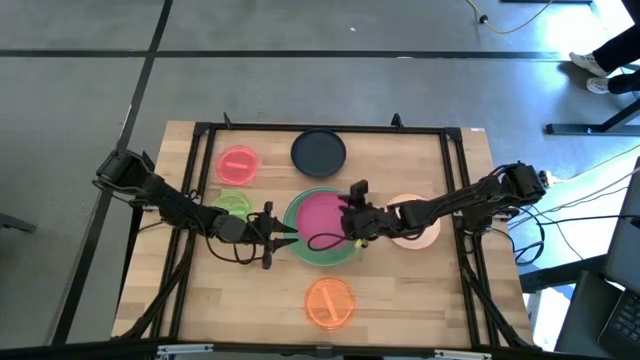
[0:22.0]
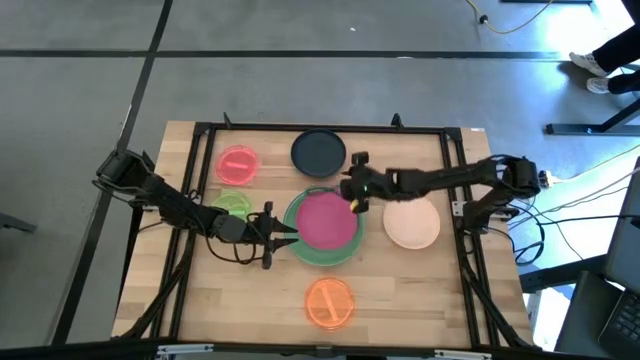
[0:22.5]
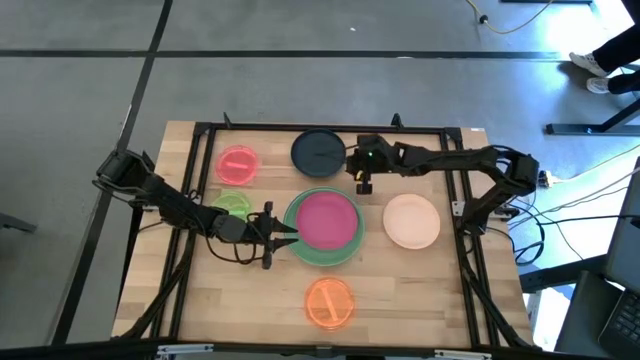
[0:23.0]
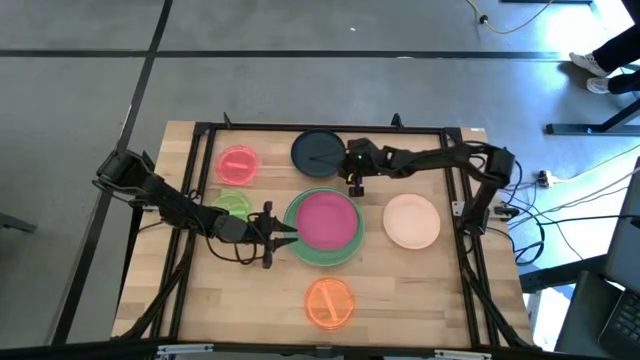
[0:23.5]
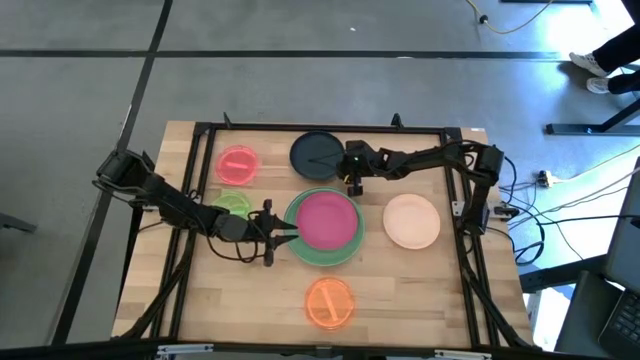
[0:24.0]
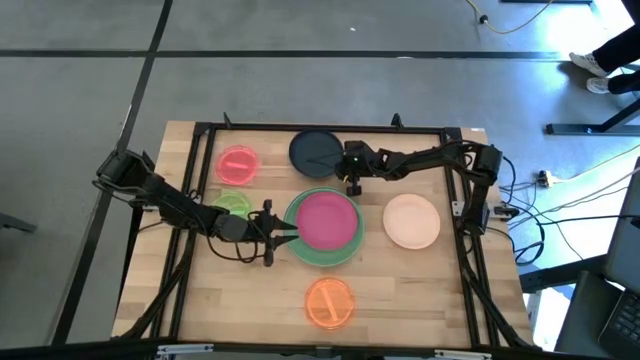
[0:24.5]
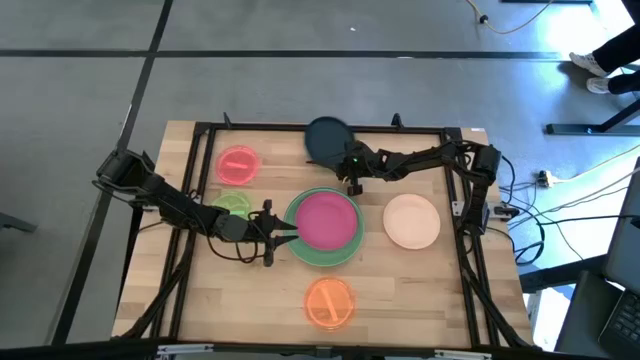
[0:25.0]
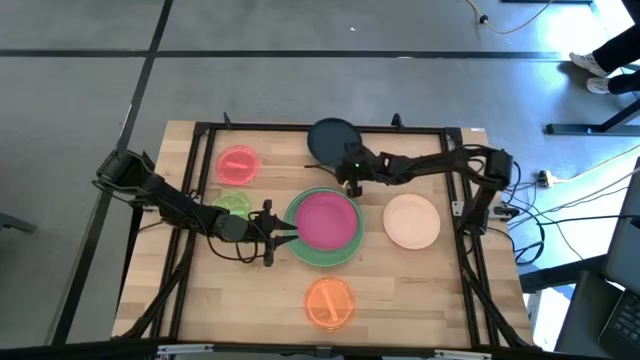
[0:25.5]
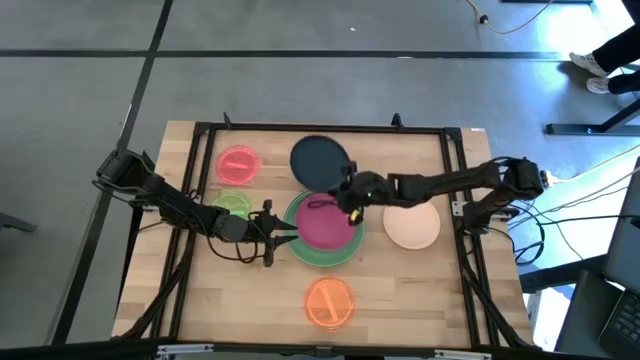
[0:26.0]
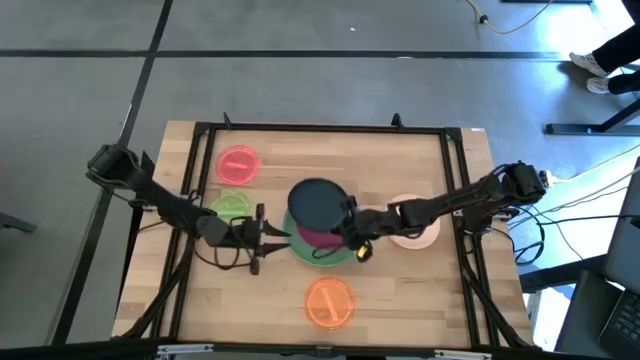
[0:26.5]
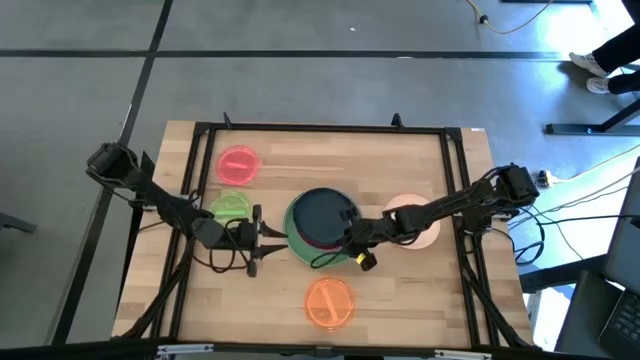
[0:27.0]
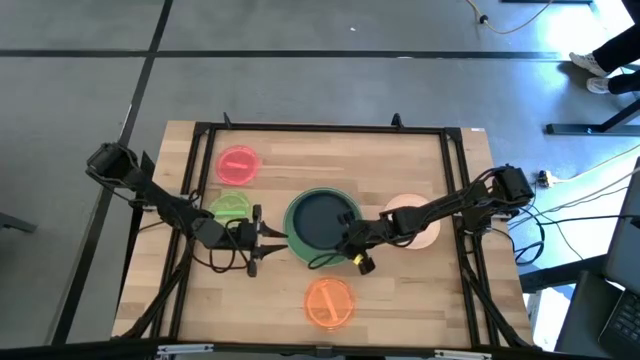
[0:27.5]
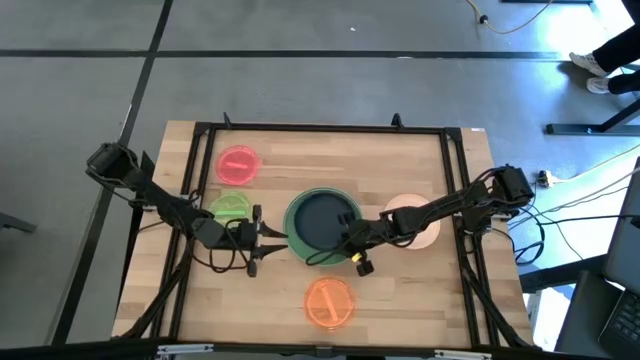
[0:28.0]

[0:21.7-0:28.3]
Task: Stack plastic plates
Stack the dark blue plate on top of the pink plate

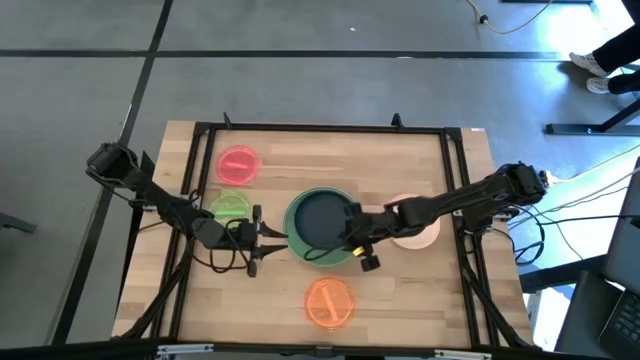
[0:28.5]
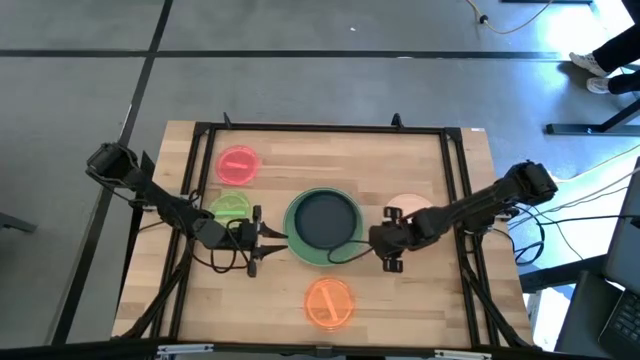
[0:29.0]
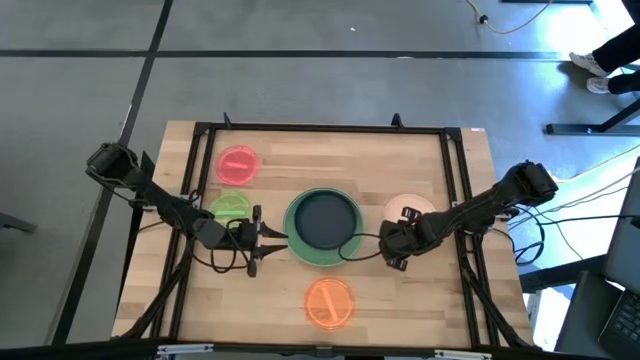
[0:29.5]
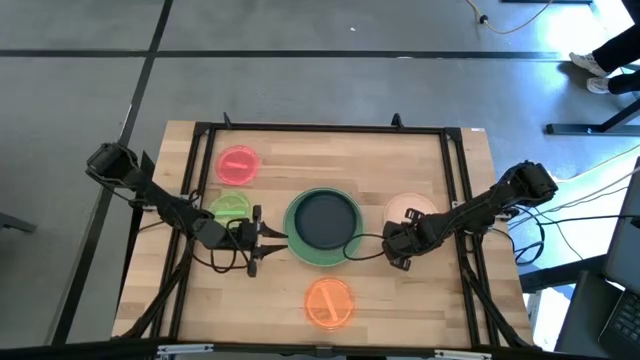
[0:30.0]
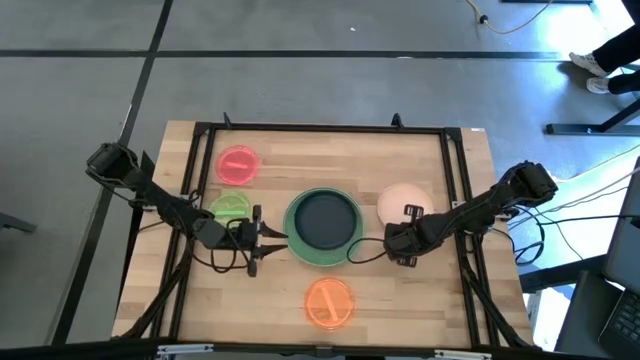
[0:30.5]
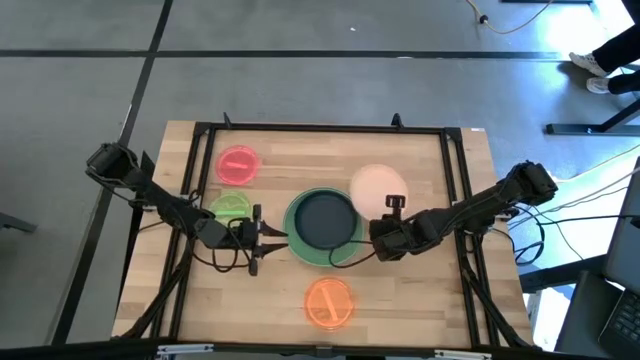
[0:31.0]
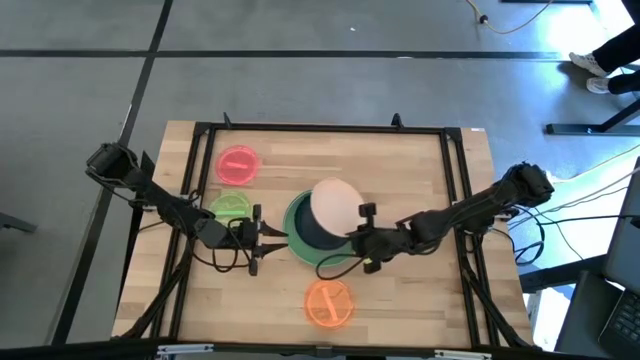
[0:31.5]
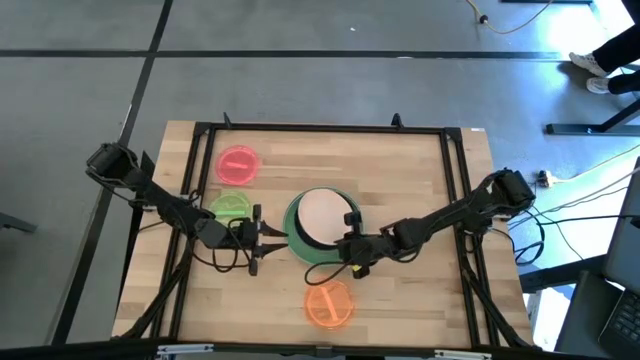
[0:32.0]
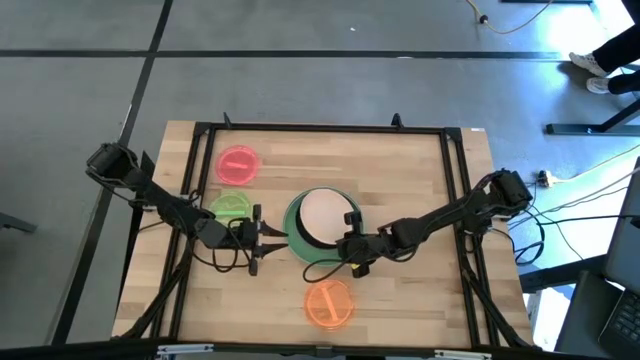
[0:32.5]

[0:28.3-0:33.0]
Stack the white plate on top of the dark blue plate

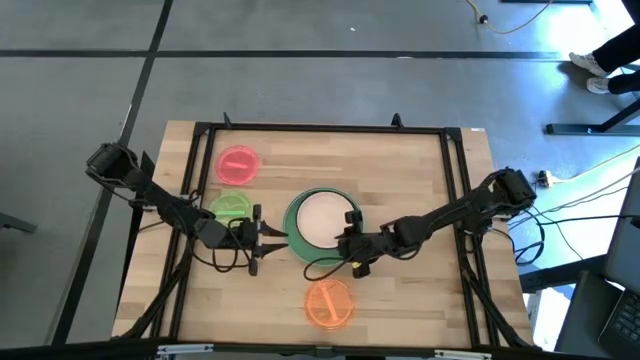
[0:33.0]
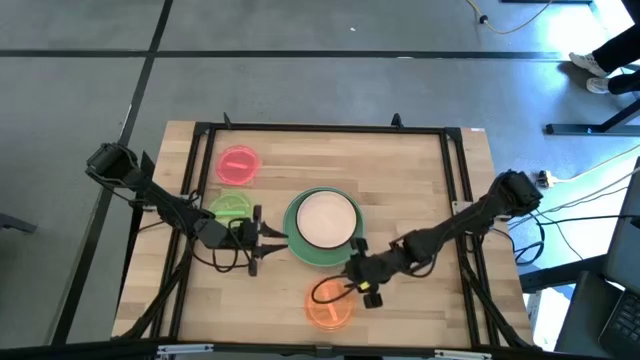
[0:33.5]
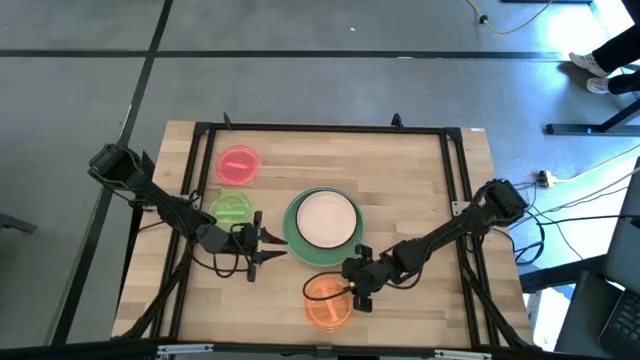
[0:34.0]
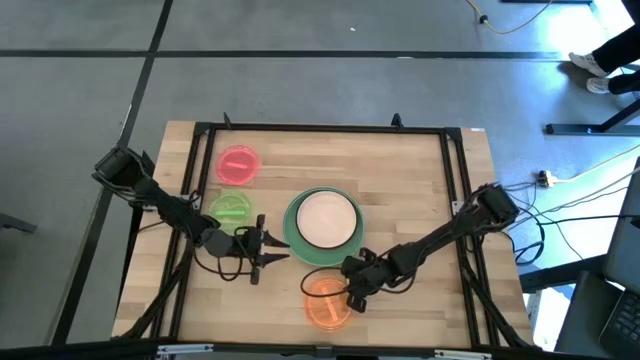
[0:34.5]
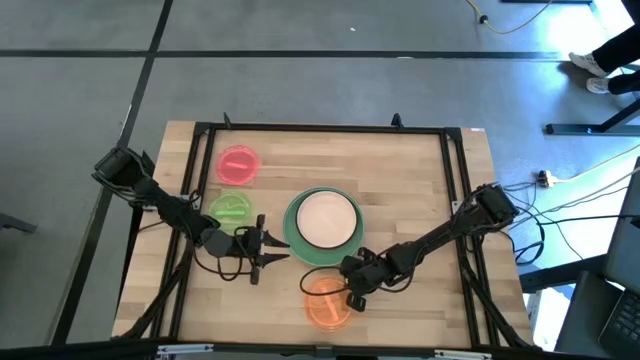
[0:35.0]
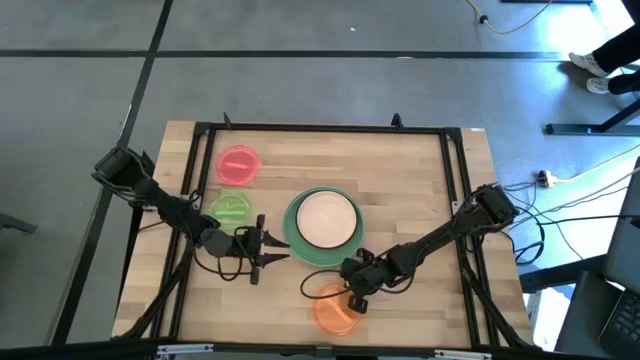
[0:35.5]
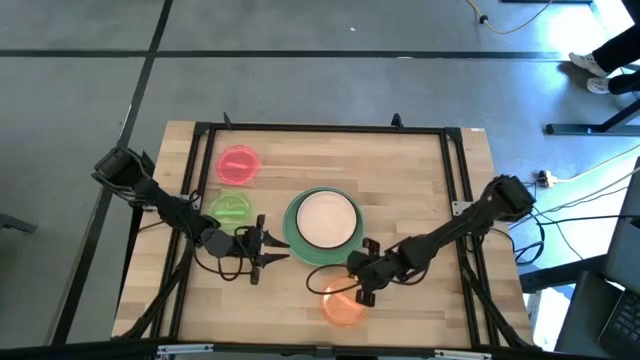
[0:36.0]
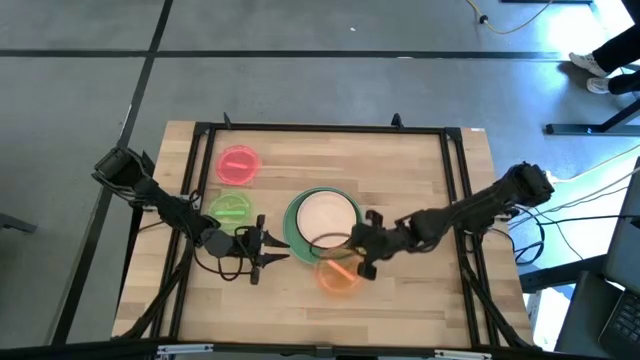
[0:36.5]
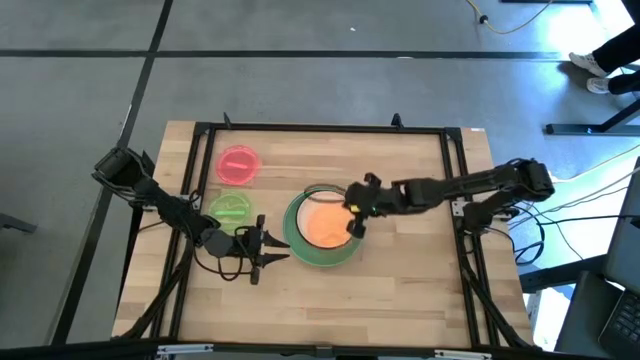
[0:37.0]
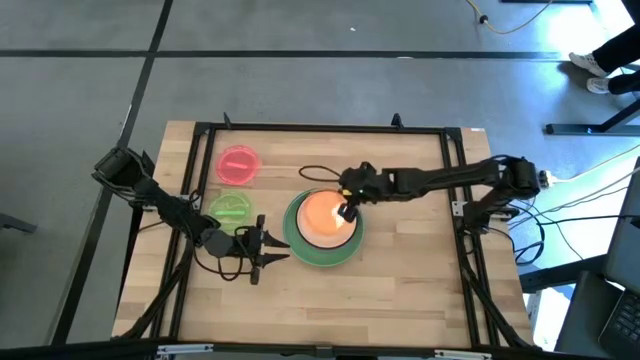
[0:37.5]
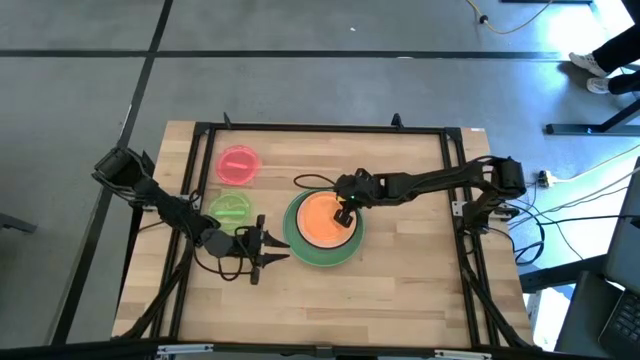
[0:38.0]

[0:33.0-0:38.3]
Stack the orange plate on top of the white plate

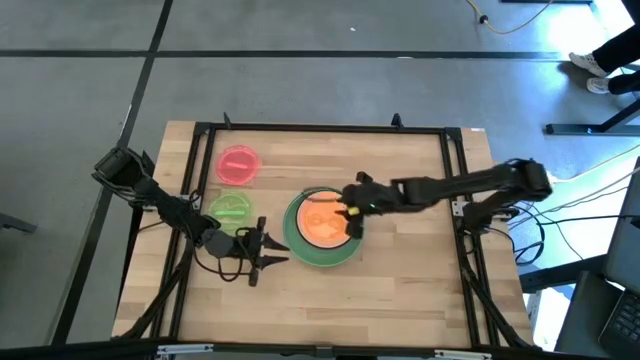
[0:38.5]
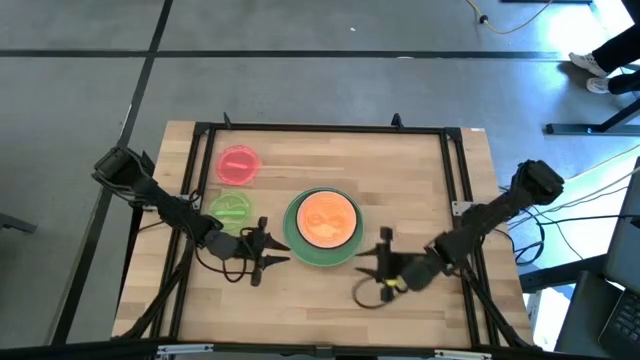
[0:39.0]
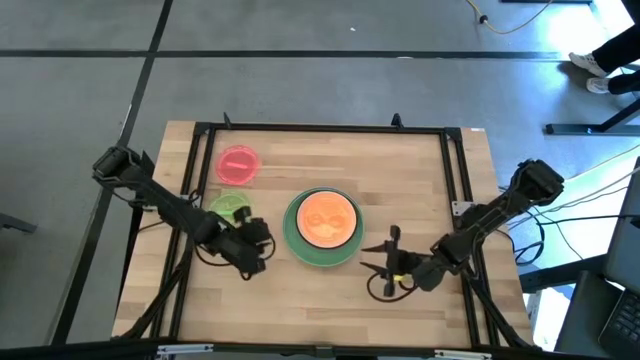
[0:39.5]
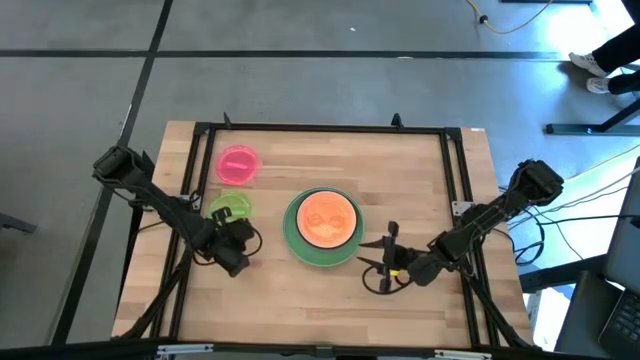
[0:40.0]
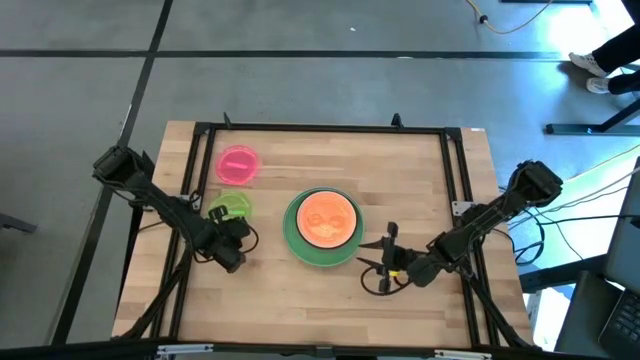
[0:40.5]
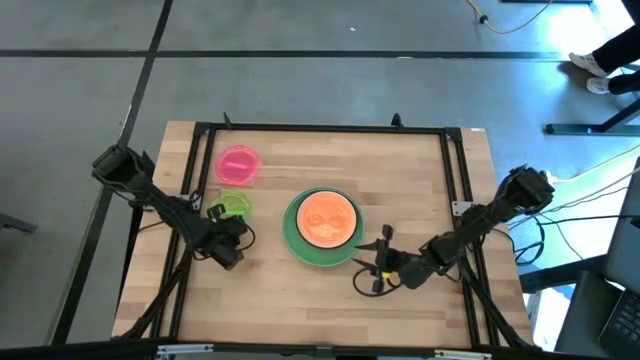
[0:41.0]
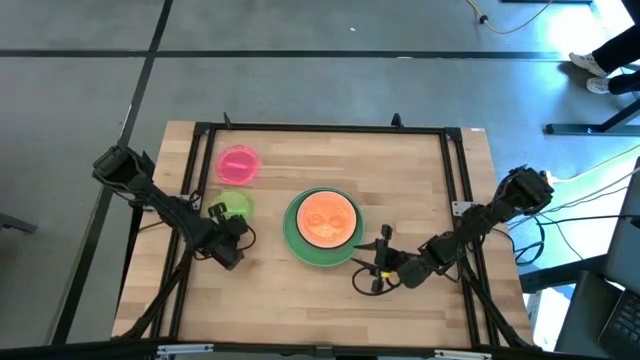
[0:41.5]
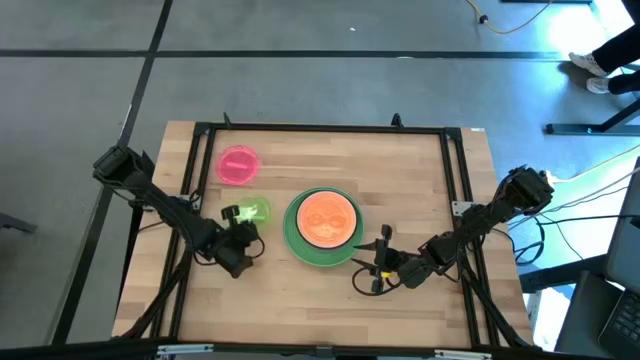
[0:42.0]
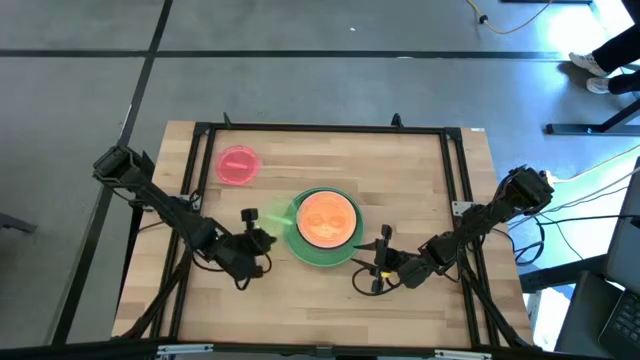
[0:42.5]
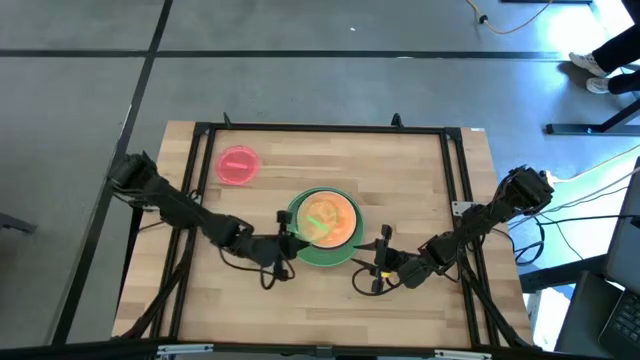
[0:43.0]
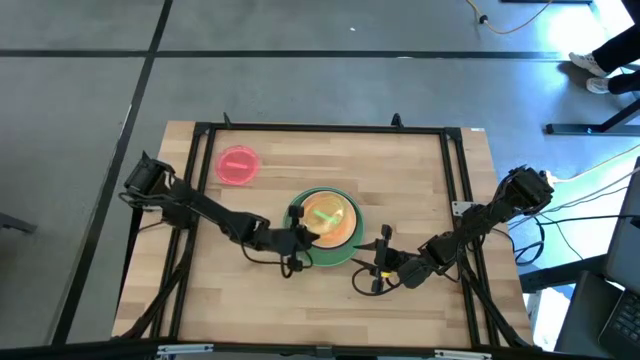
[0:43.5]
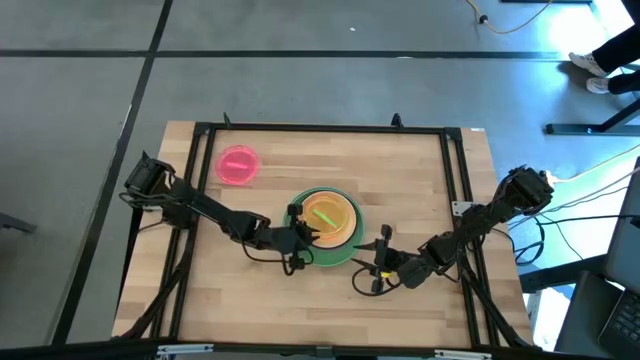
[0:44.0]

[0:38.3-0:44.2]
Stack the light green plate on top of the orange plate
